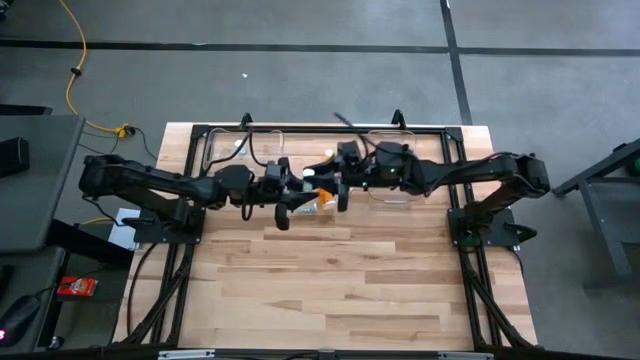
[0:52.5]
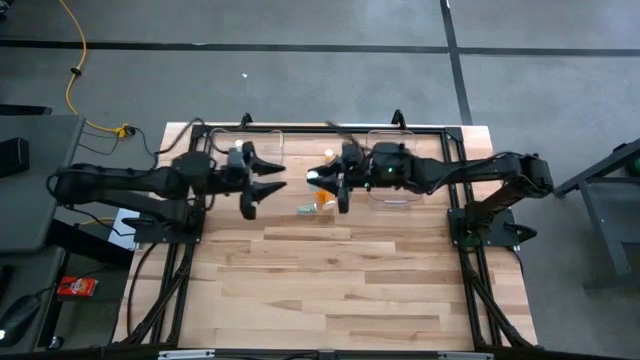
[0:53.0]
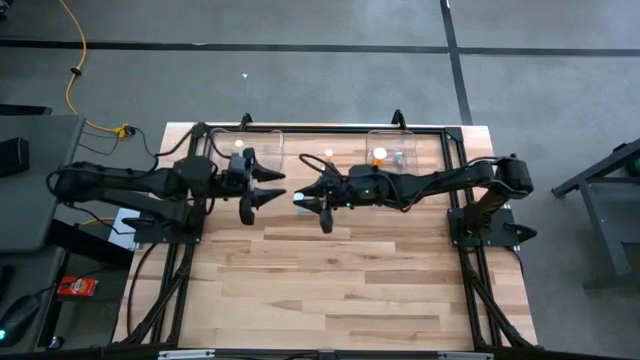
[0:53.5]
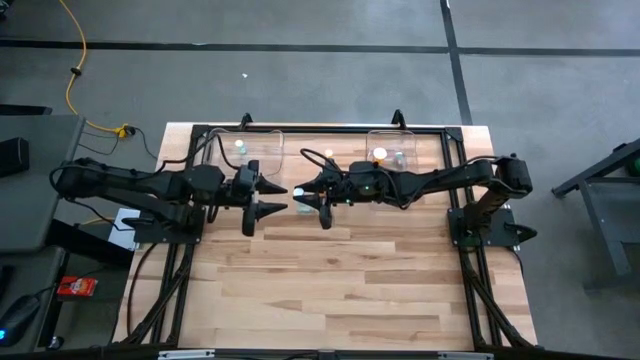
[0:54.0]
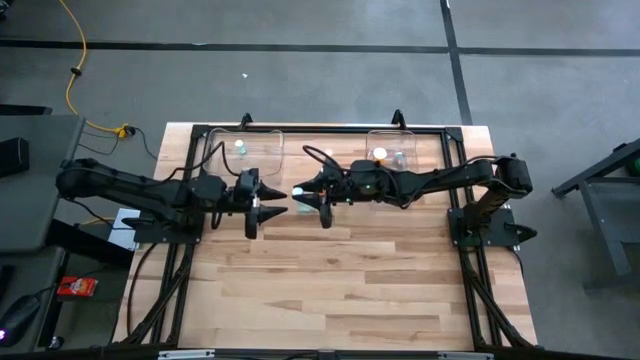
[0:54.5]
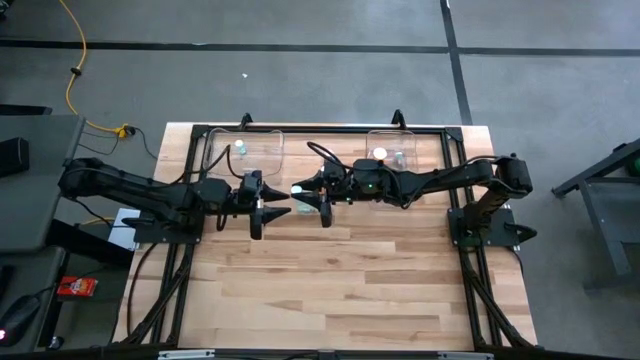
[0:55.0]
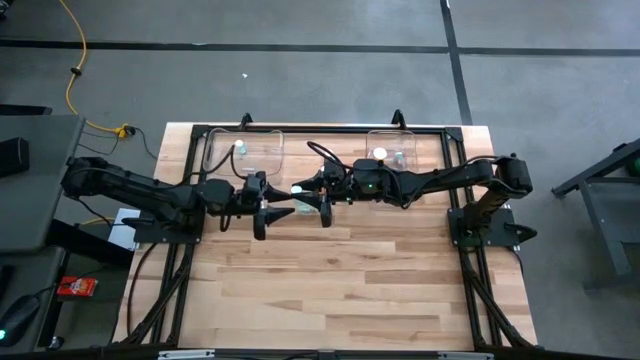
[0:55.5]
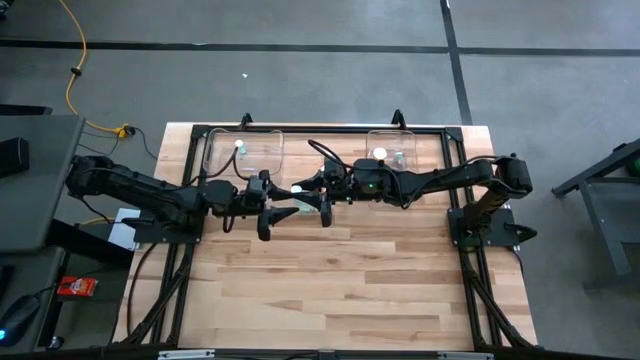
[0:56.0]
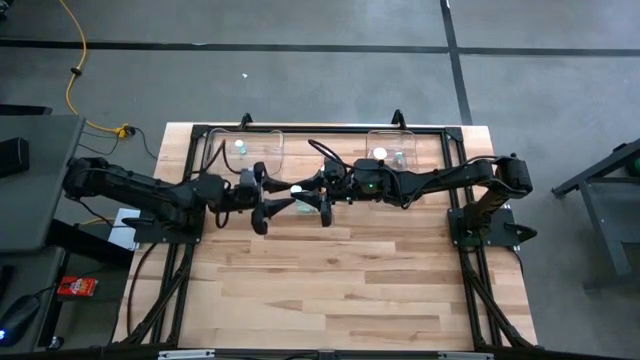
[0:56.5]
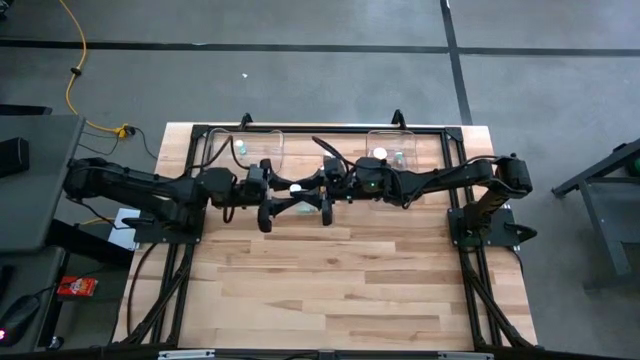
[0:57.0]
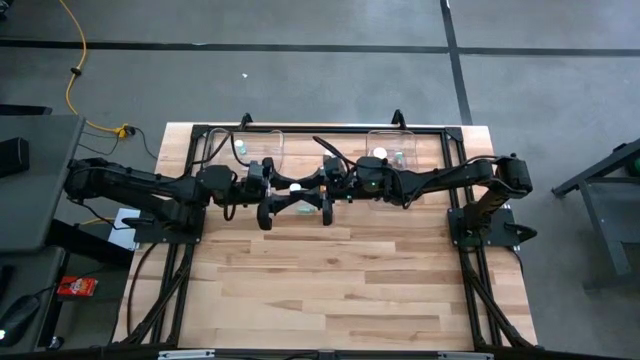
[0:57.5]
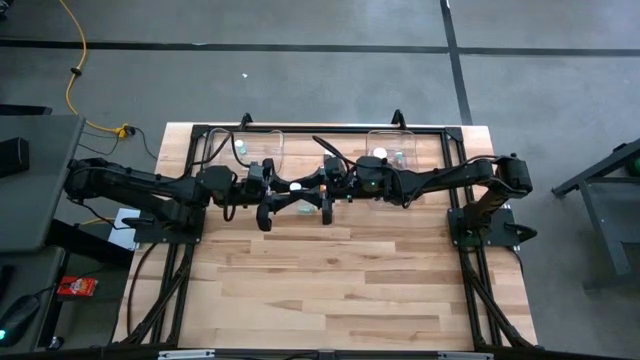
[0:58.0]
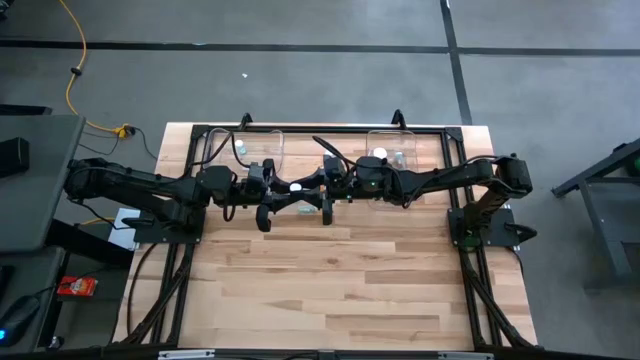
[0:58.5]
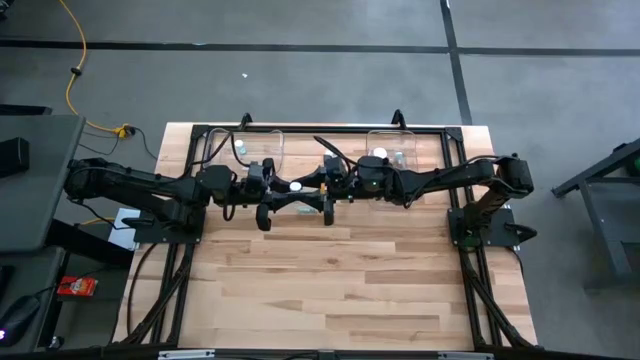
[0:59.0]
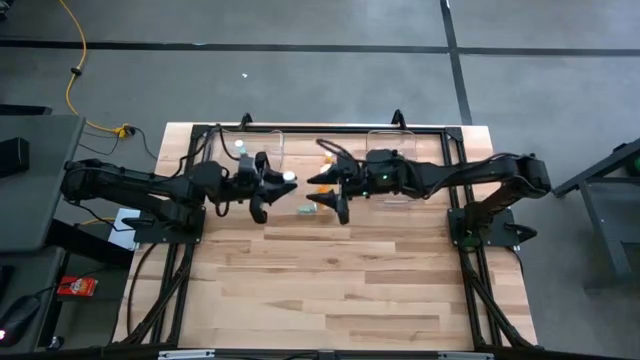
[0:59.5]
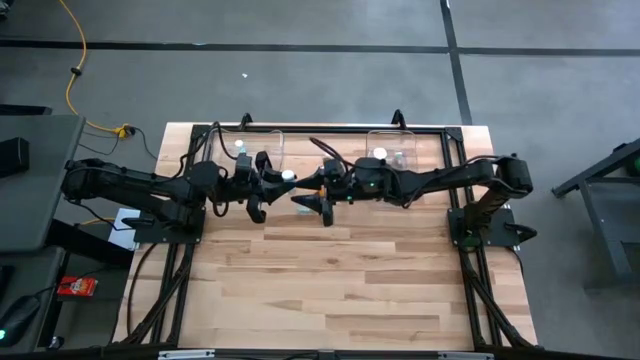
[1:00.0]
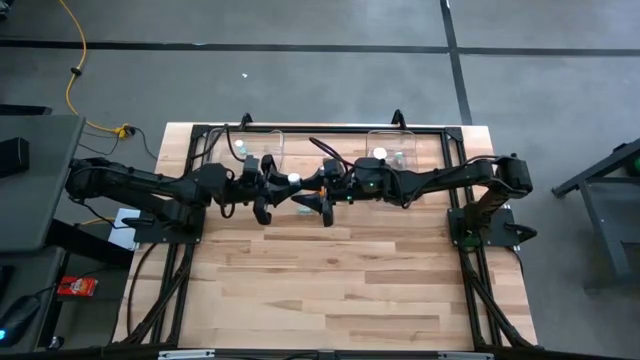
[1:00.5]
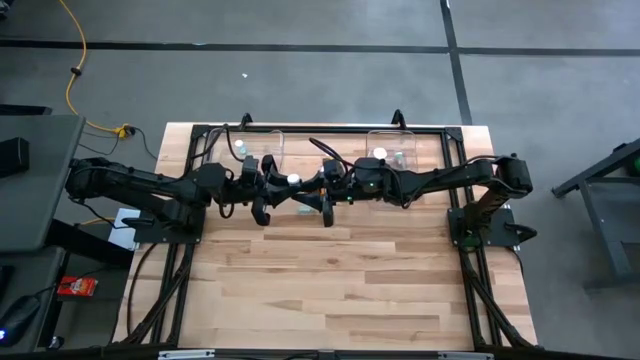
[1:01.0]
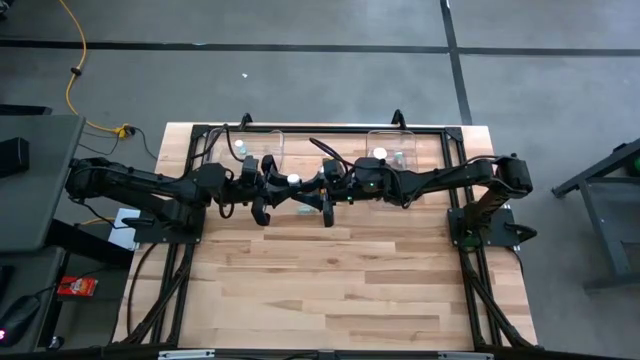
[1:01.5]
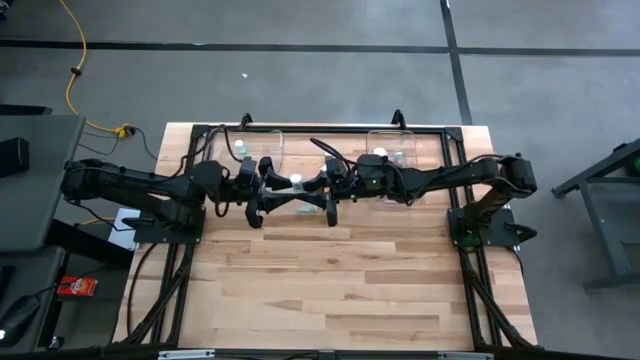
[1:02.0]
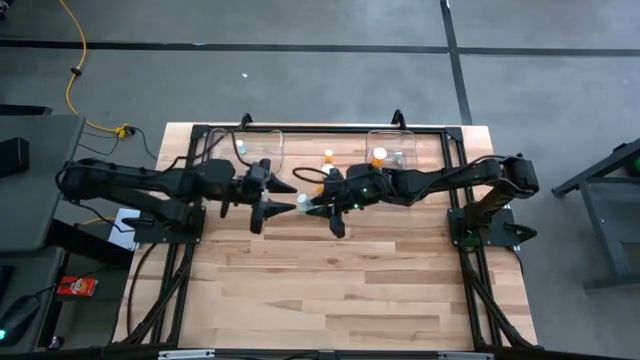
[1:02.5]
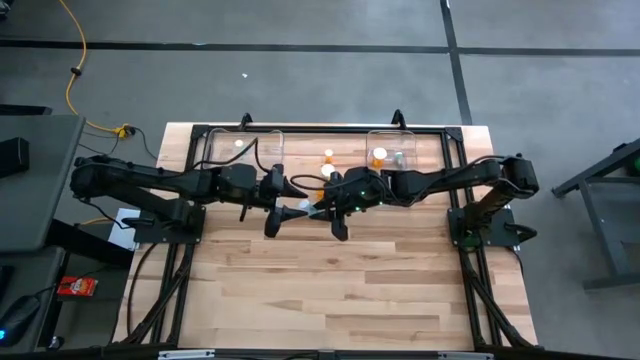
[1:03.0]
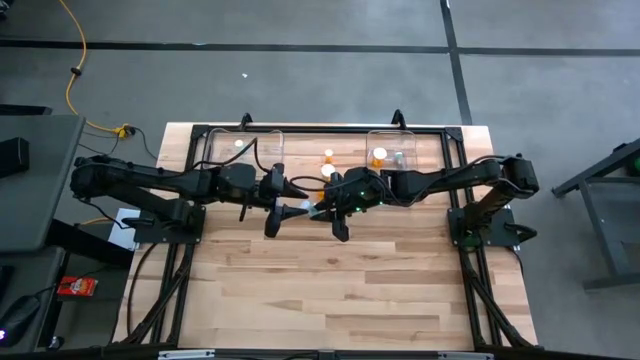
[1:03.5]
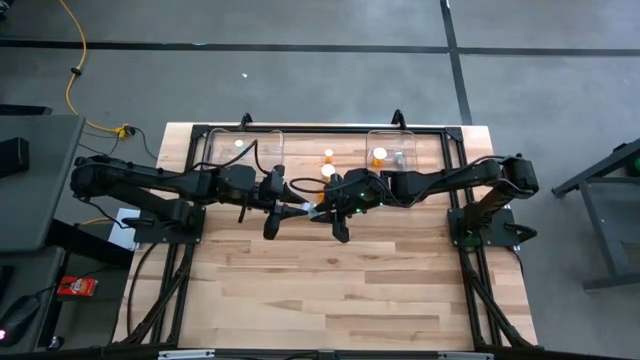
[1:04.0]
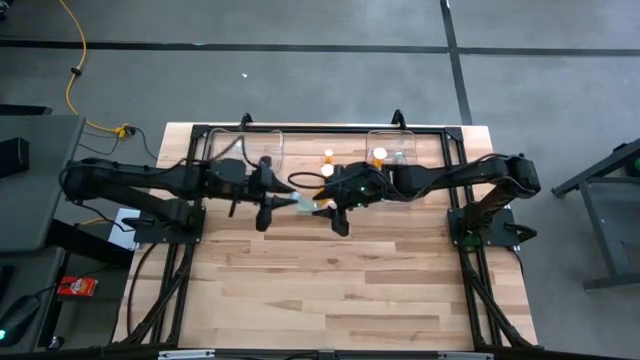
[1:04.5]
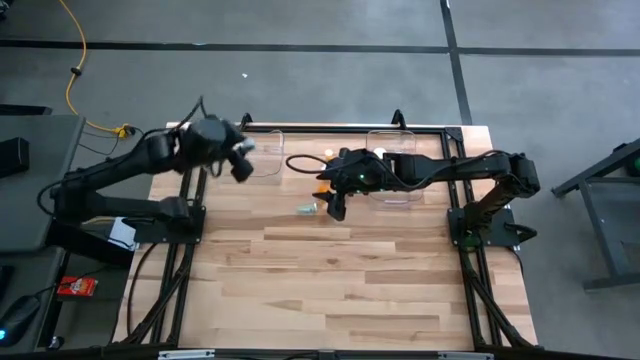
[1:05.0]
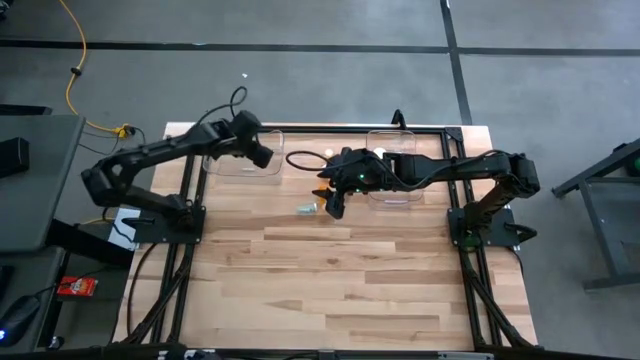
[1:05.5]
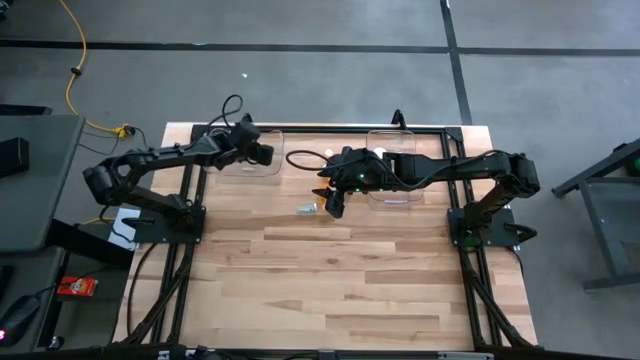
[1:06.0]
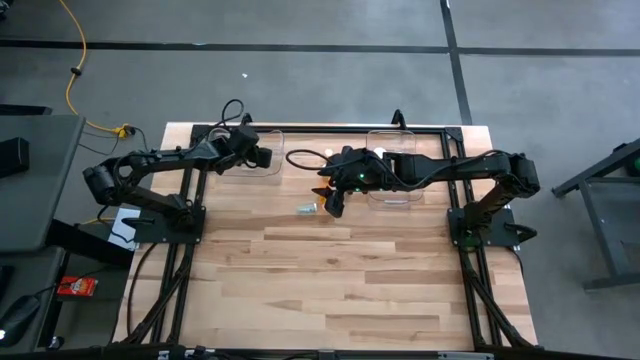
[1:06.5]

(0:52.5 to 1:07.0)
Task: Pick and place medicine bottles into bin by pill shape (circle, oval)
Put the blue tablet bottle into the left transparent bin

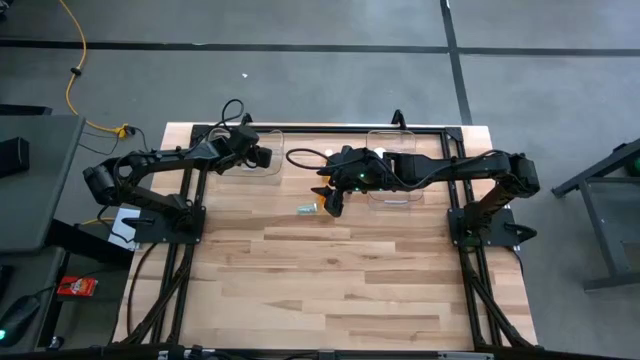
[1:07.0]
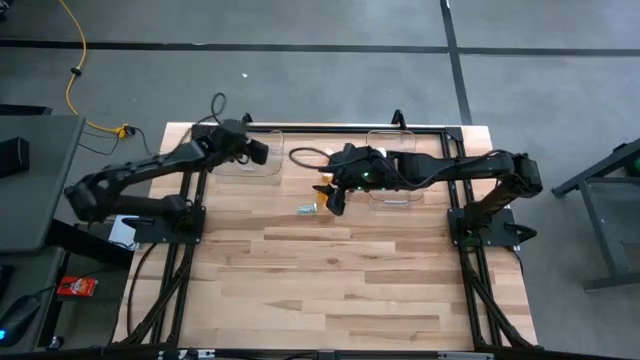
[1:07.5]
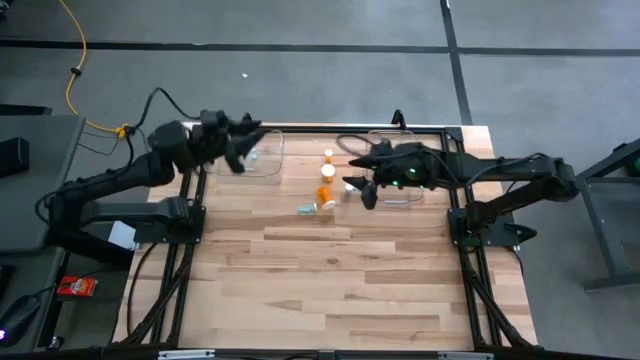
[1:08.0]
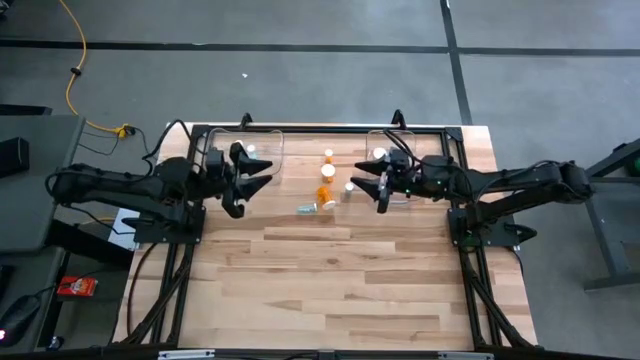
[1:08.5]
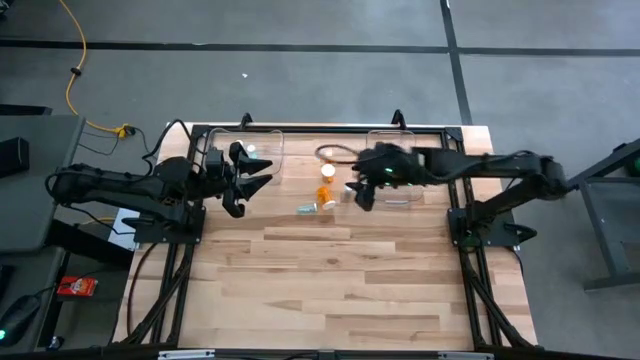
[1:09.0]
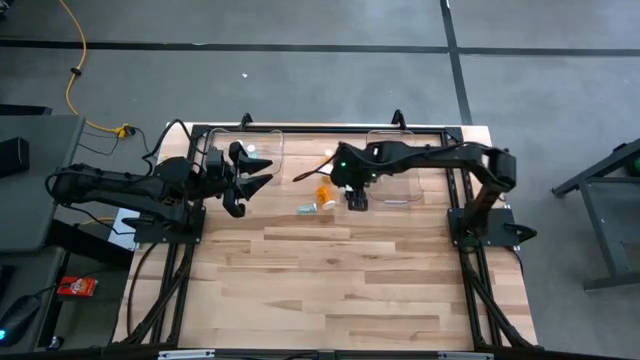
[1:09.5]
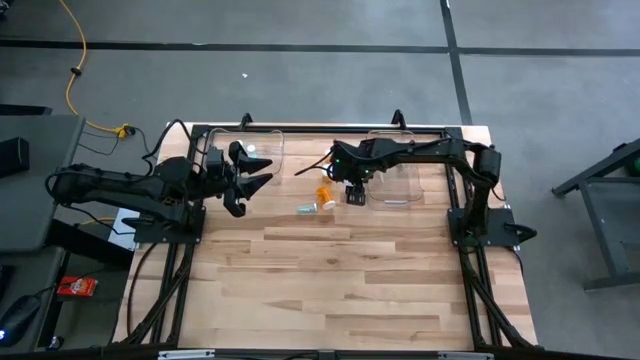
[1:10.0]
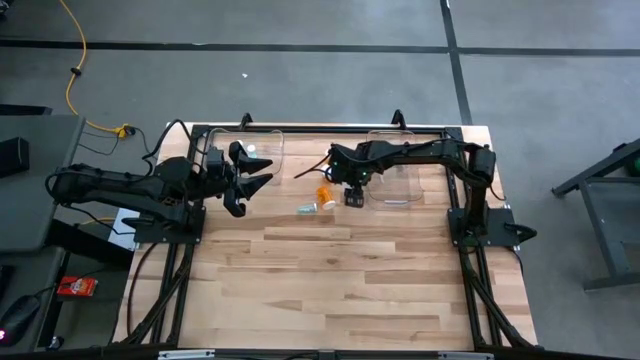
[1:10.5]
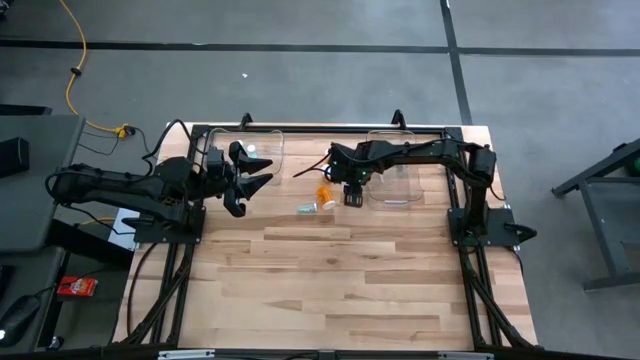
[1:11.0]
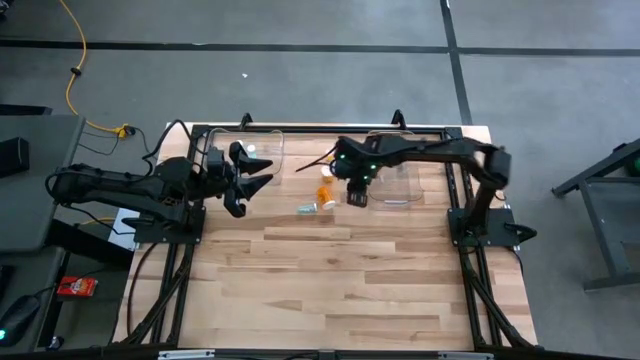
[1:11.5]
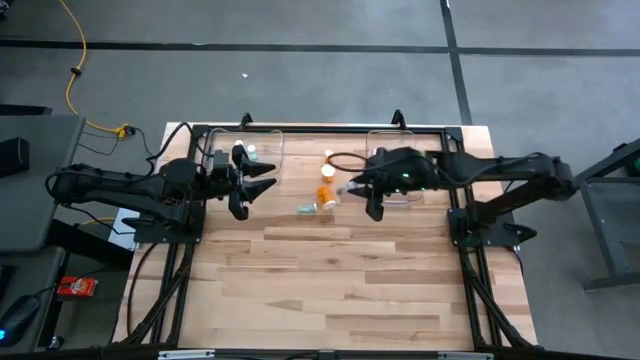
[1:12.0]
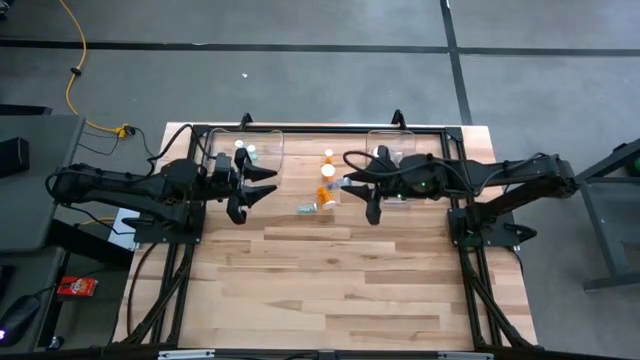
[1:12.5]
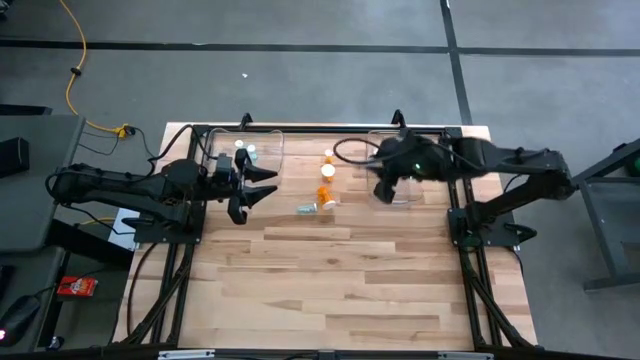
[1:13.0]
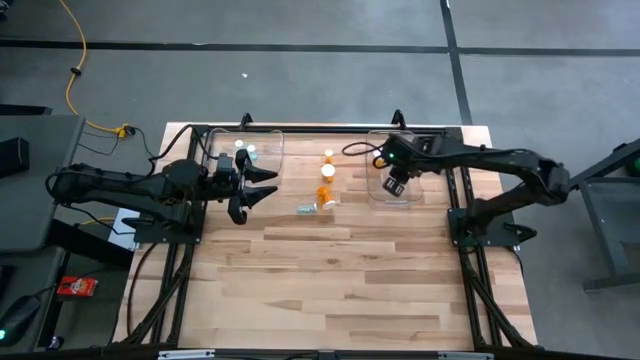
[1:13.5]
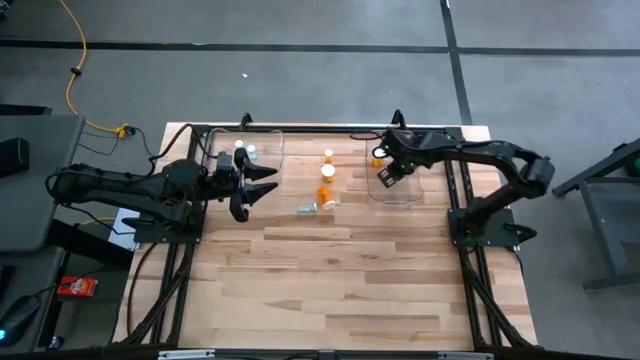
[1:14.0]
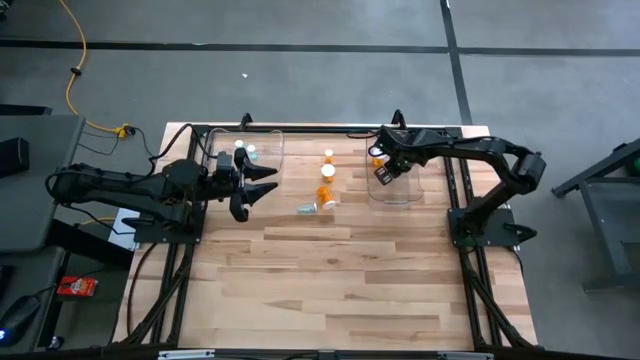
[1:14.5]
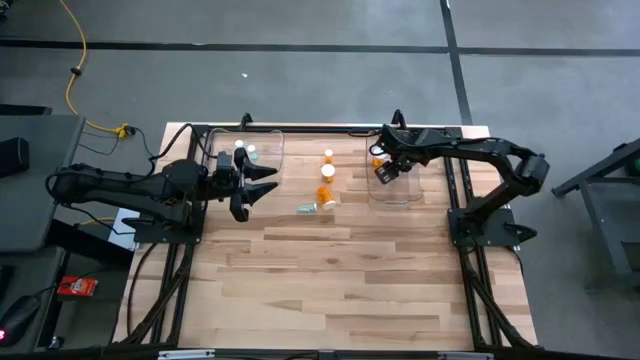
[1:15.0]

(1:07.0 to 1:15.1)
Put the blue capsule bottle into the right transparent bin
